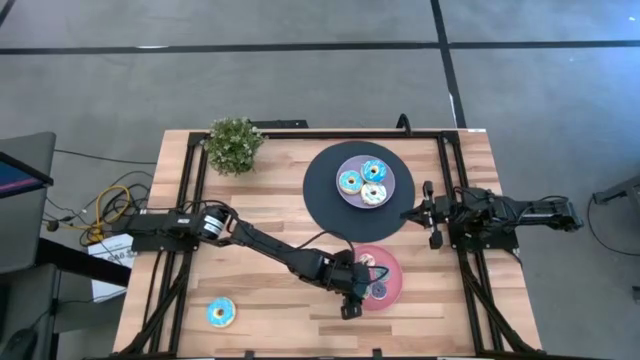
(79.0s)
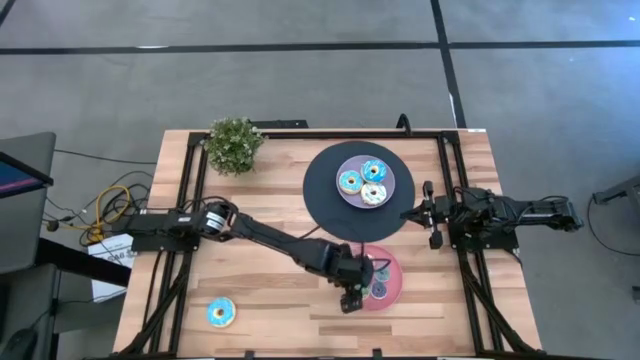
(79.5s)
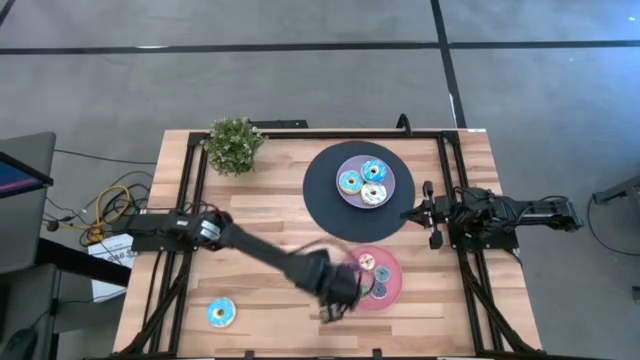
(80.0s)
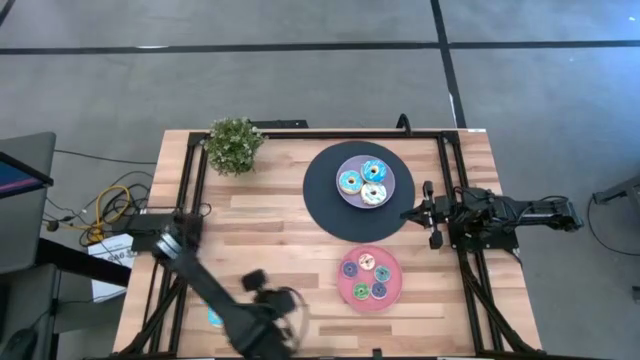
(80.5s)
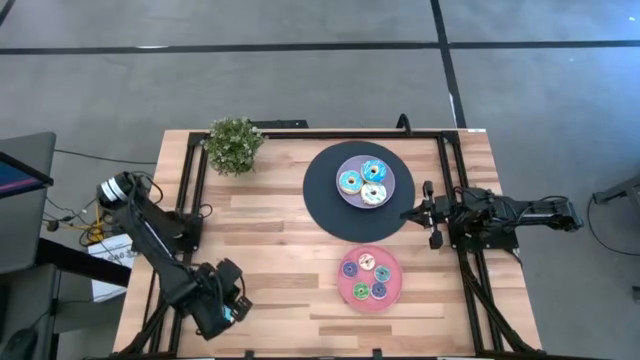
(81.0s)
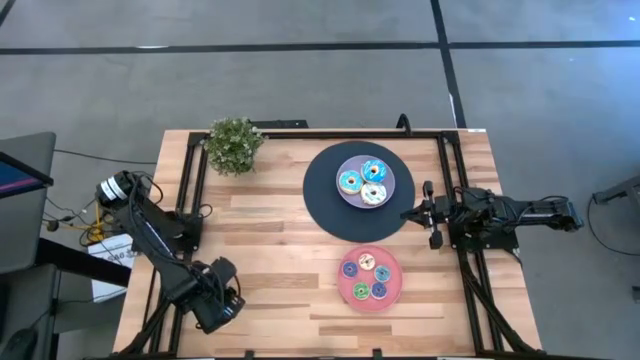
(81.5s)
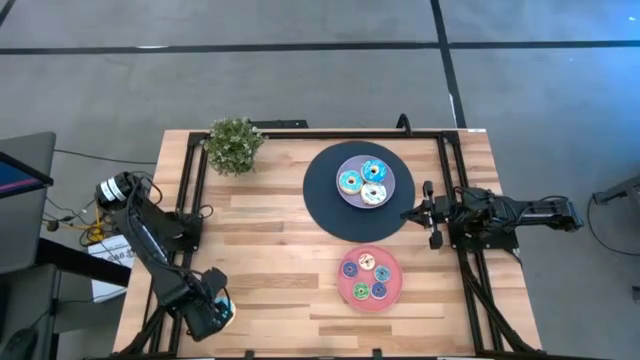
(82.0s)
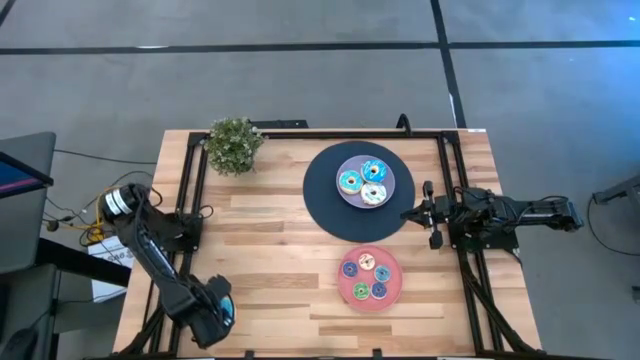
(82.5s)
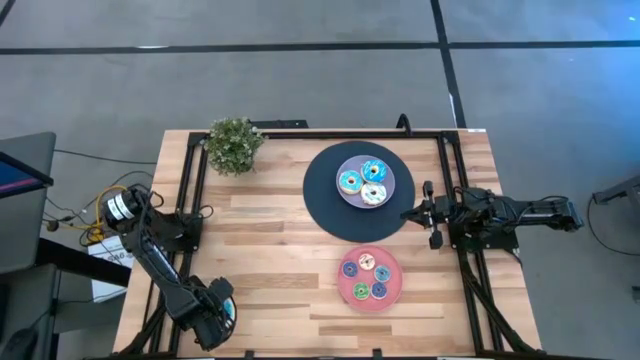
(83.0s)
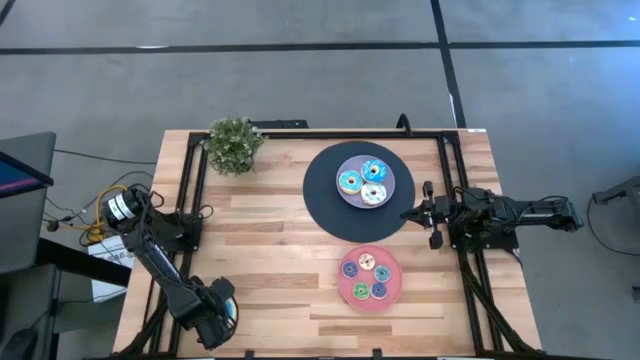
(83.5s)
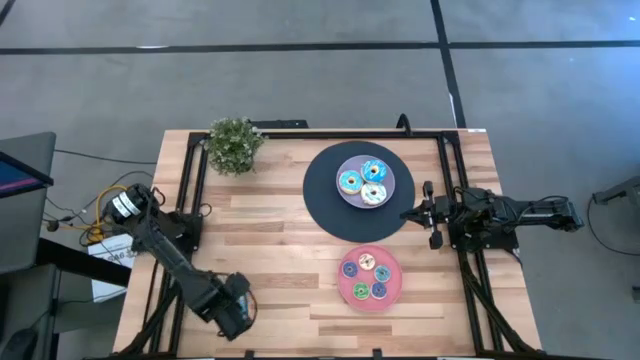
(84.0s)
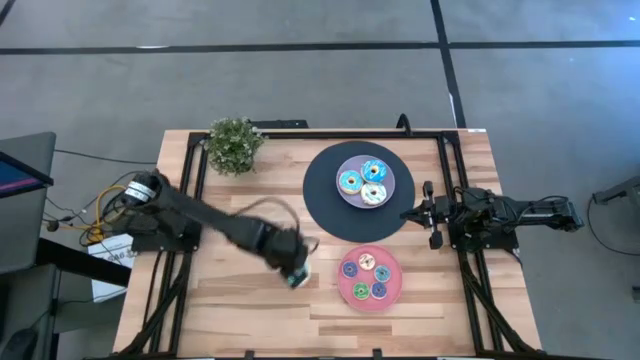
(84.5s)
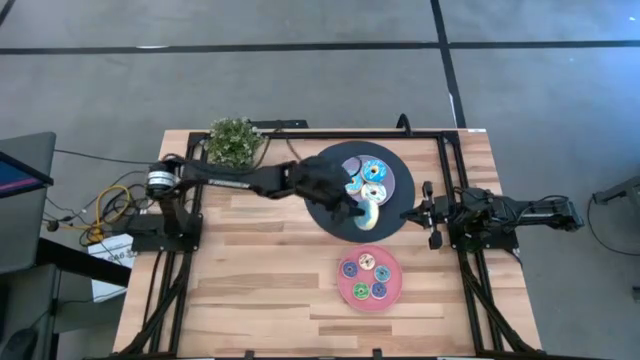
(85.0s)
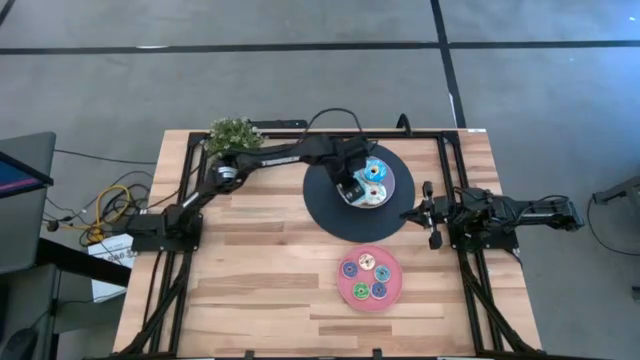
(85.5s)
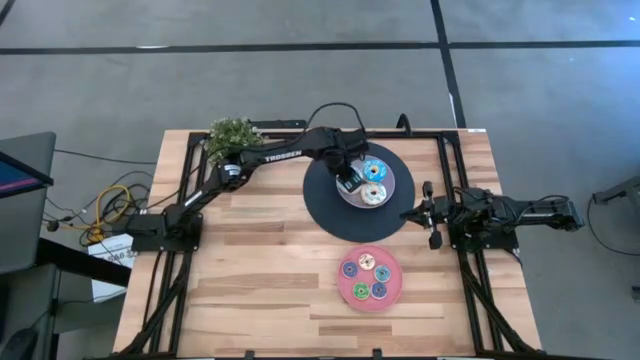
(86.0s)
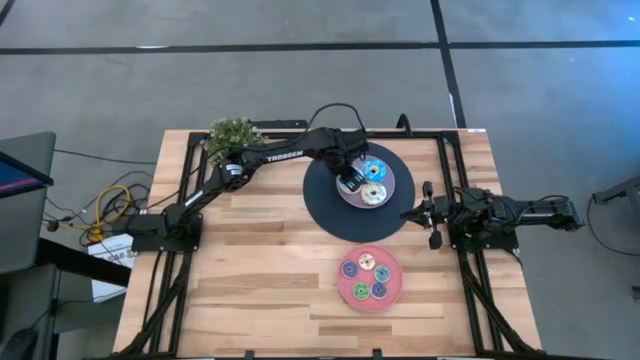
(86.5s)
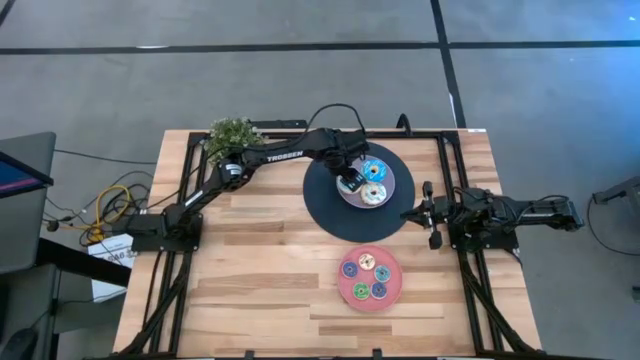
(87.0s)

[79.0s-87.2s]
Task: Pick & Place donuts
Put the big blue donut into the purple plate

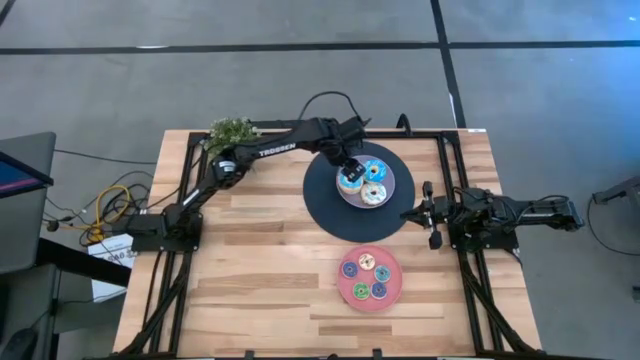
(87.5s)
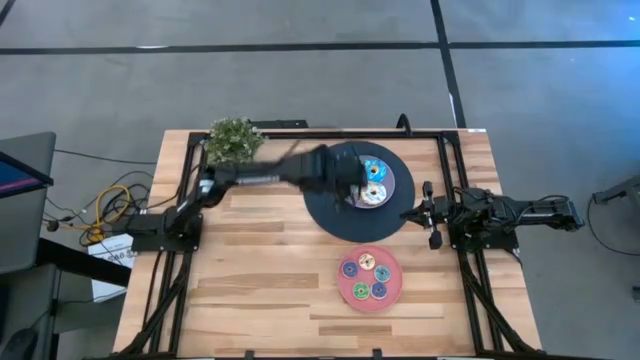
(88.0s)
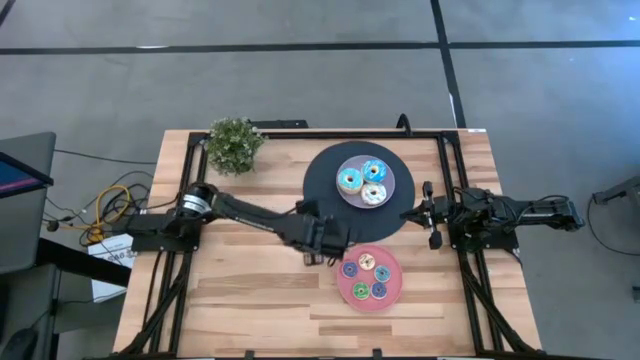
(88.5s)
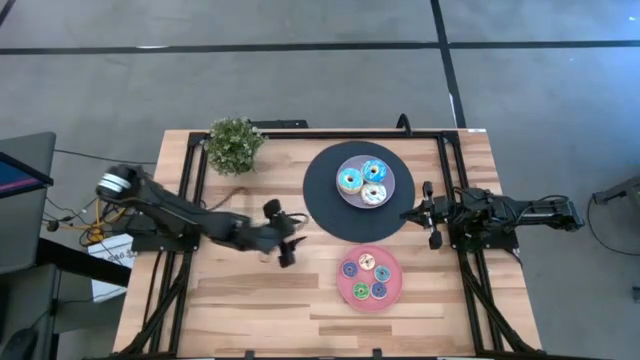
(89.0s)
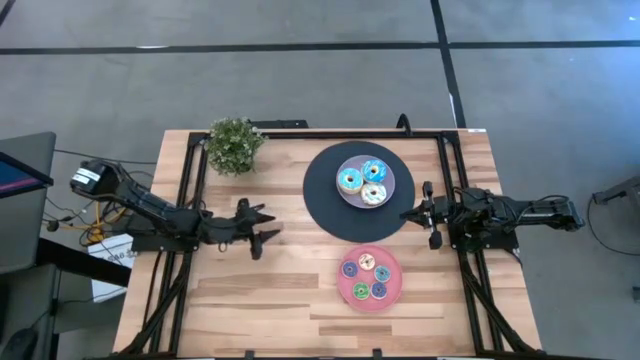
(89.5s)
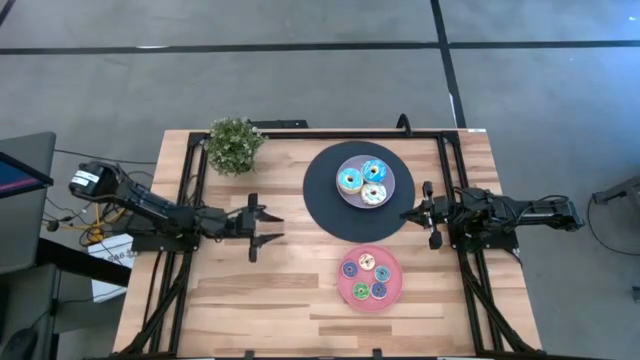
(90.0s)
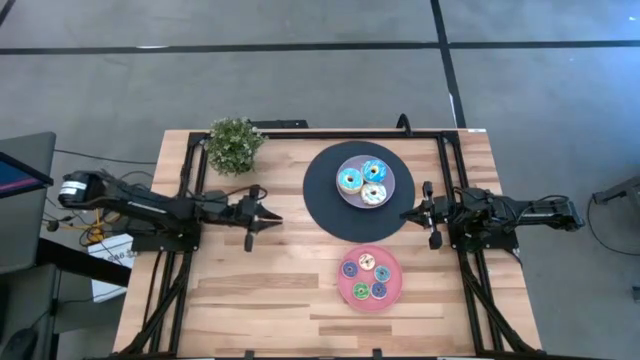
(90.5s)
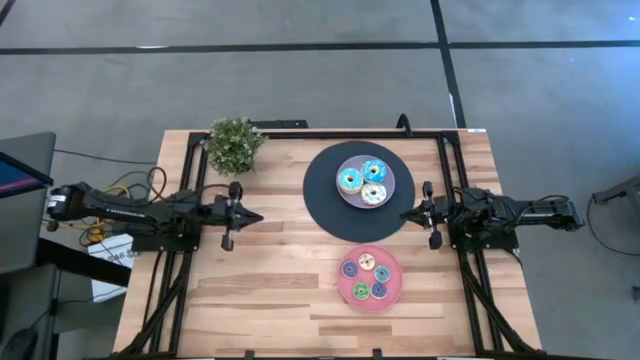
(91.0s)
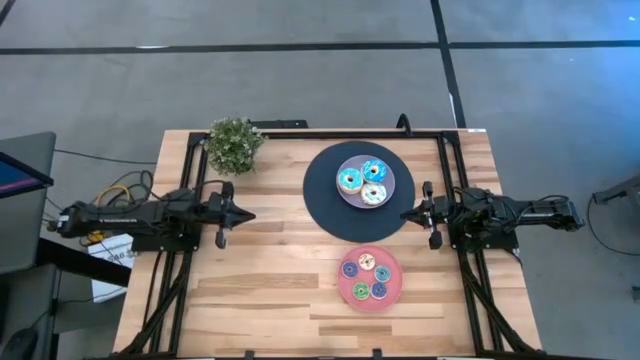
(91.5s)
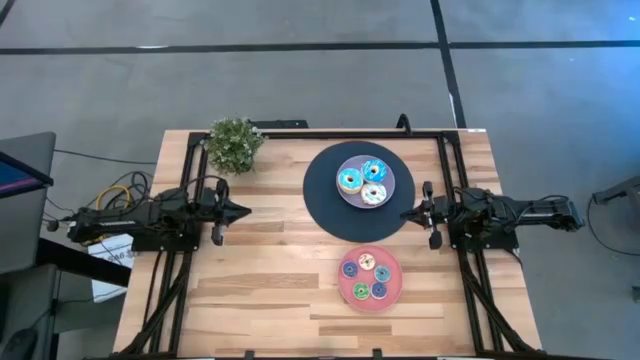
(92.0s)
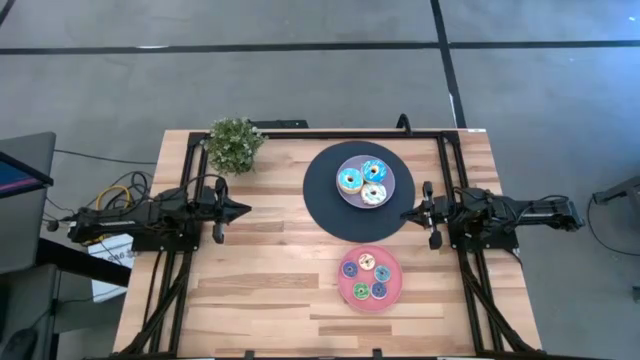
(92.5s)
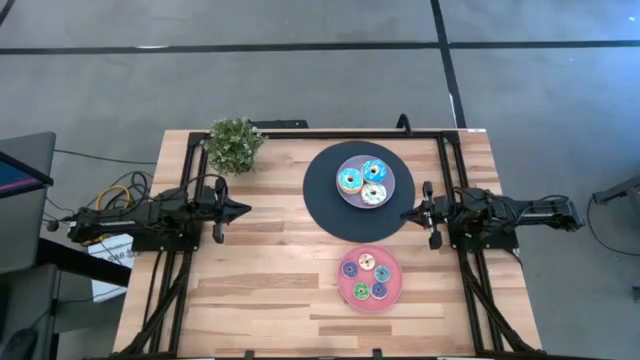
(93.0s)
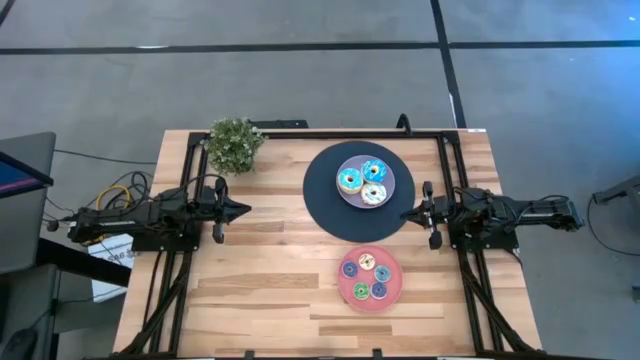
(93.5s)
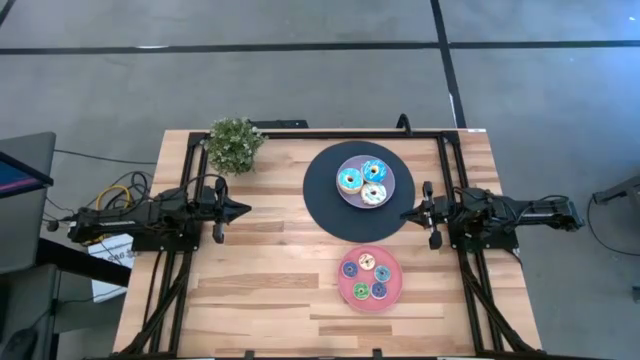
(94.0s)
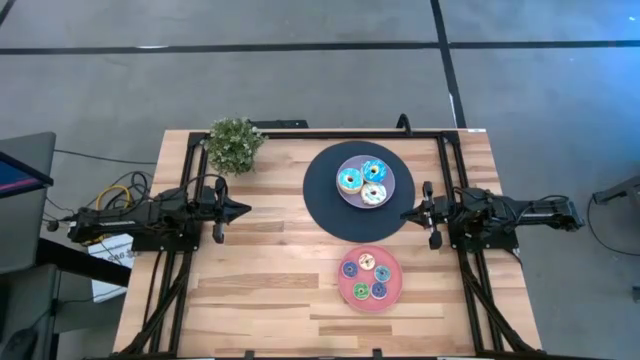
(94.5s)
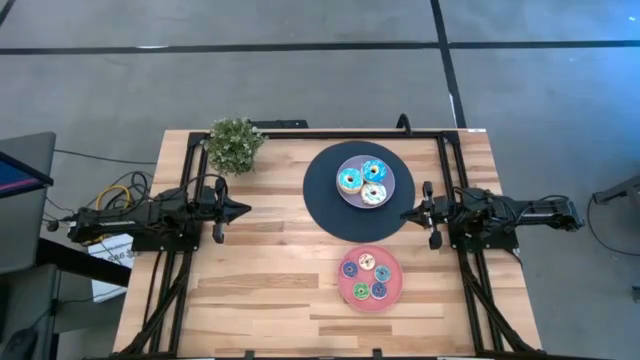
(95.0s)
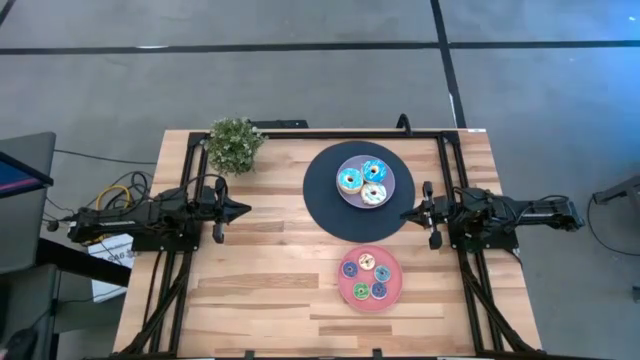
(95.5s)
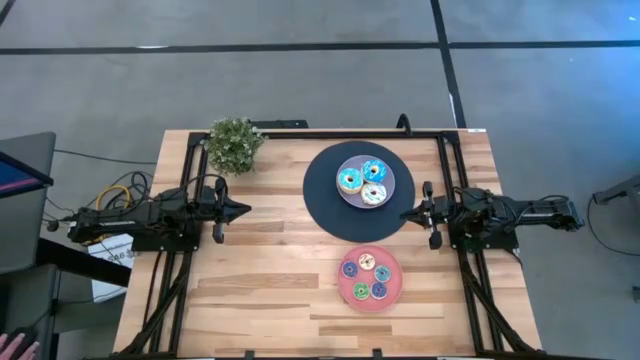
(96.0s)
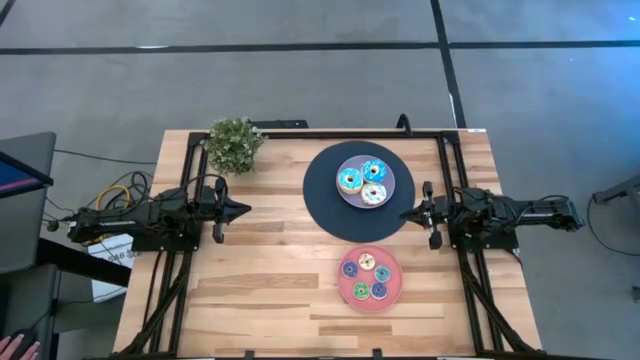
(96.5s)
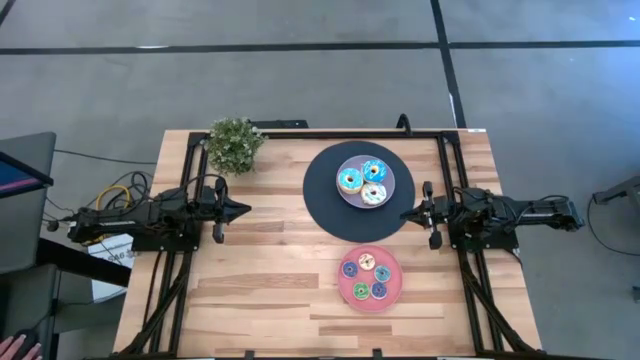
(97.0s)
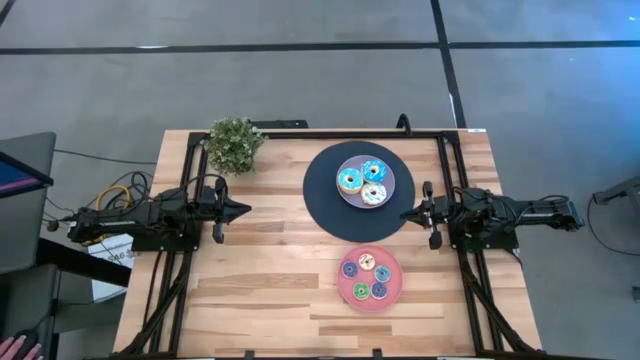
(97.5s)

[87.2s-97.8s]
Return to Home Position

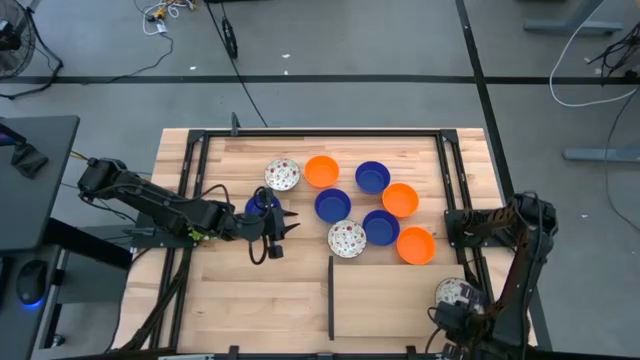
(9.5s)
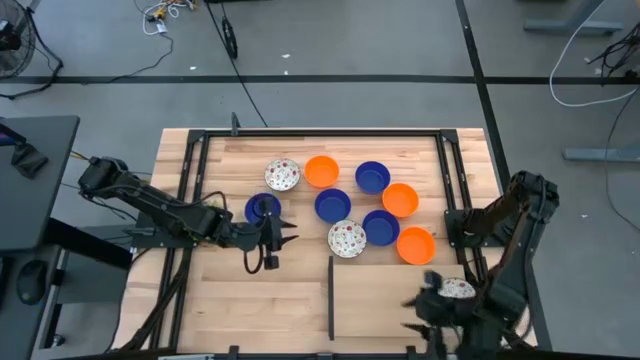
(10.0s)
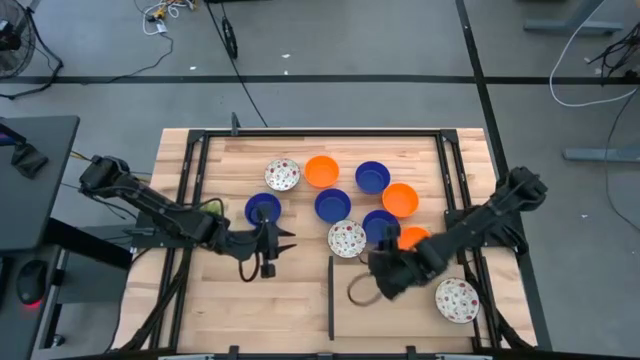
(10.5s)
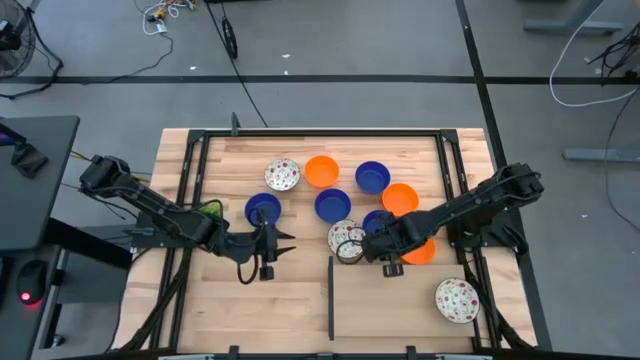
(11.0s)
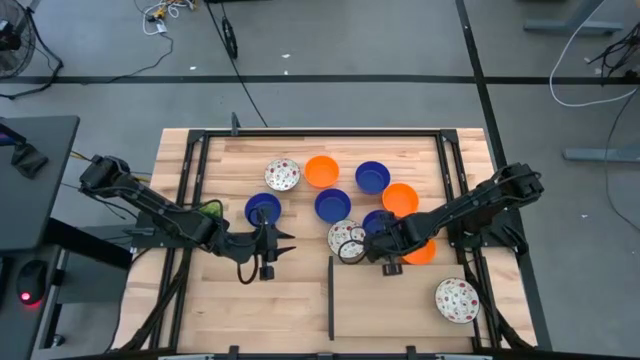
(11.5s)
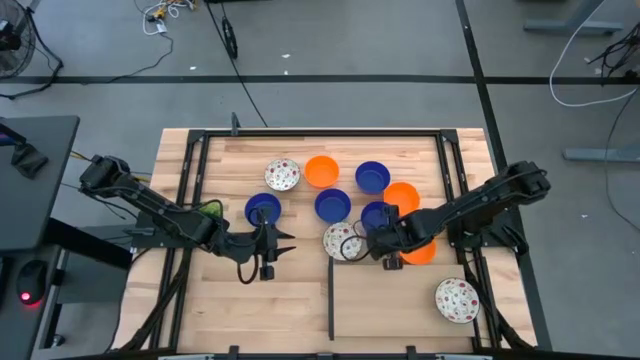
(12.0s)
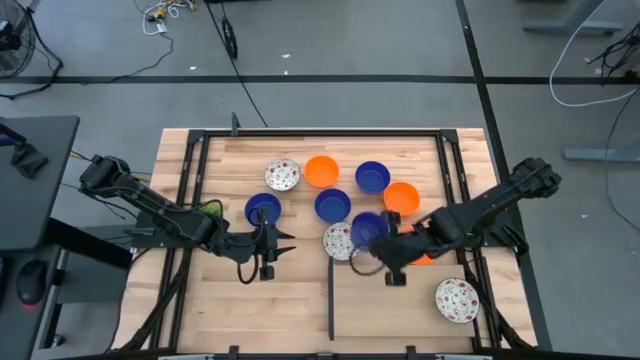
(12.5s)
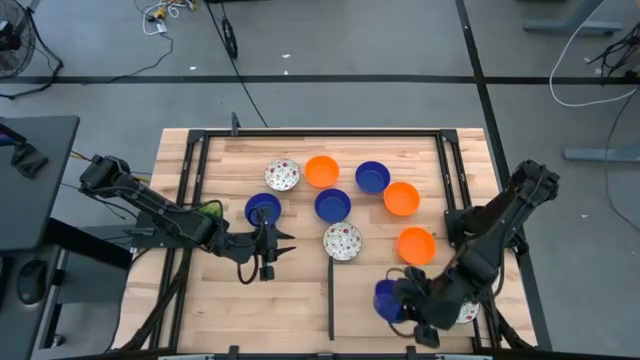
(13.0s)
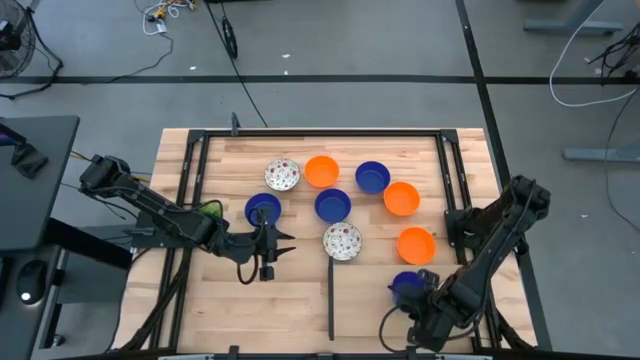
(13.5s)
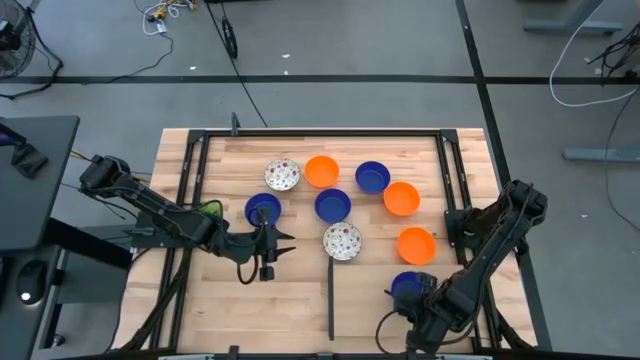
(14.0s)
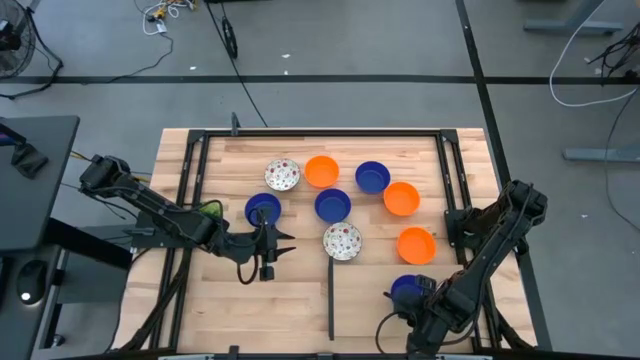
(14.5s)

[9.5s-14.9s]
Task: Pick & Place Mini bowls
Put the blue bowl on the shelf
